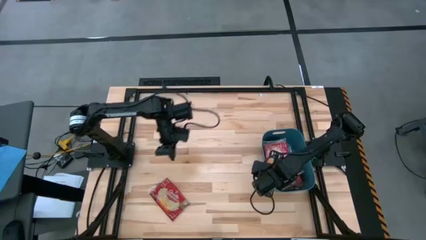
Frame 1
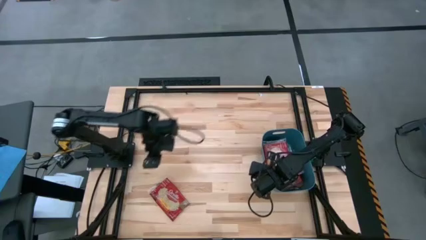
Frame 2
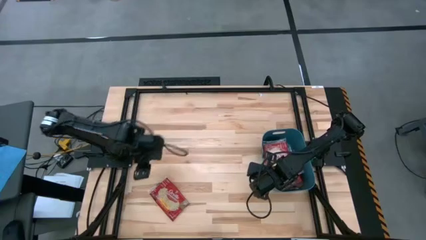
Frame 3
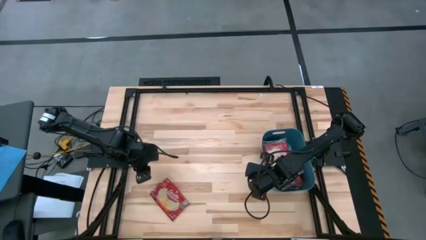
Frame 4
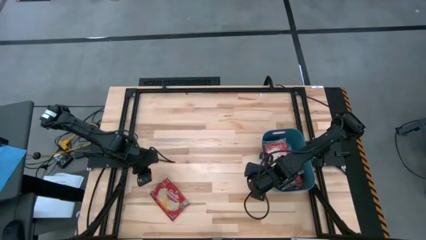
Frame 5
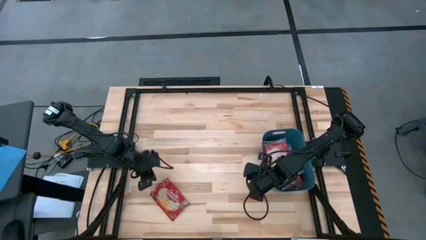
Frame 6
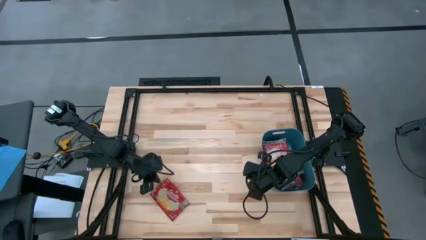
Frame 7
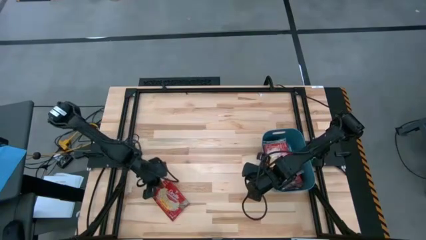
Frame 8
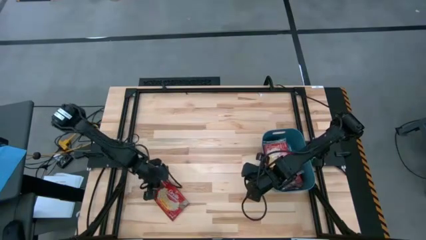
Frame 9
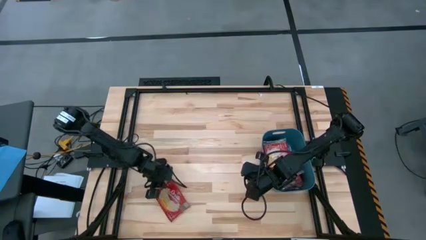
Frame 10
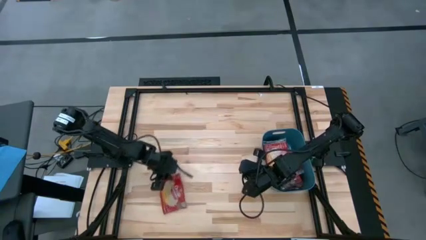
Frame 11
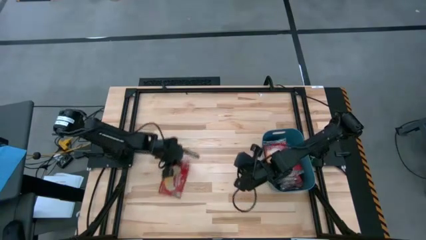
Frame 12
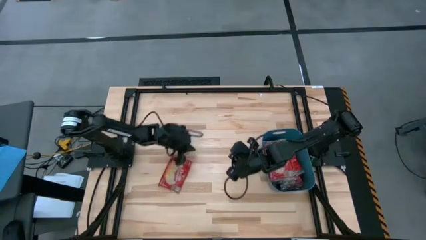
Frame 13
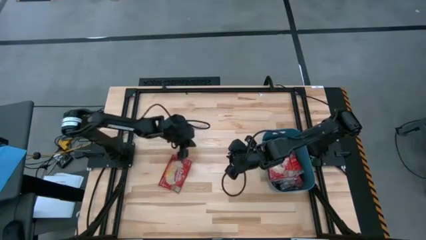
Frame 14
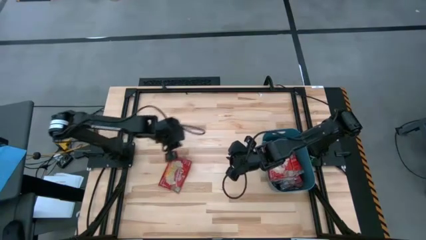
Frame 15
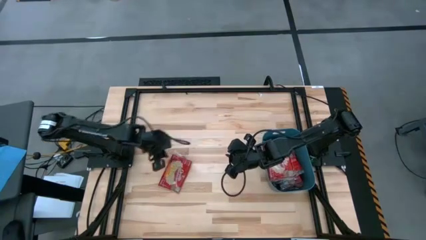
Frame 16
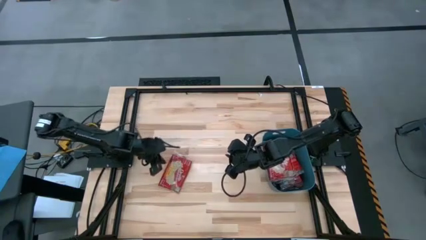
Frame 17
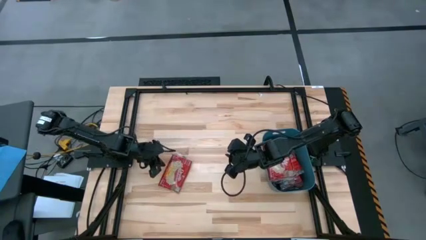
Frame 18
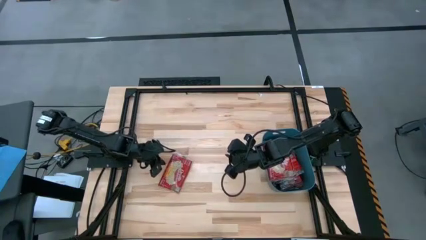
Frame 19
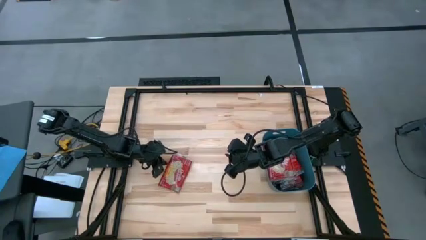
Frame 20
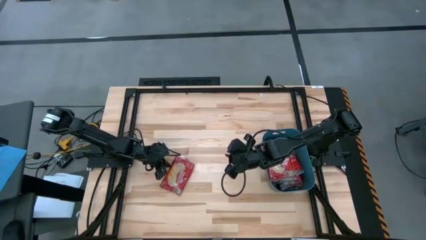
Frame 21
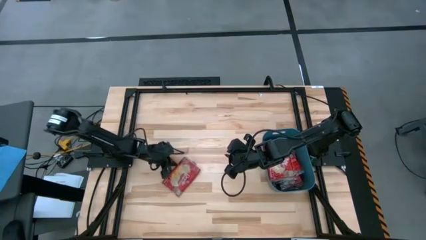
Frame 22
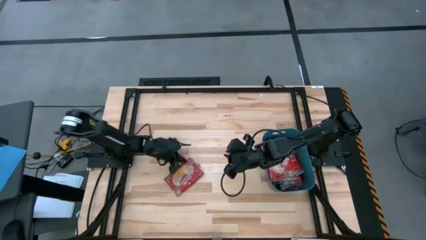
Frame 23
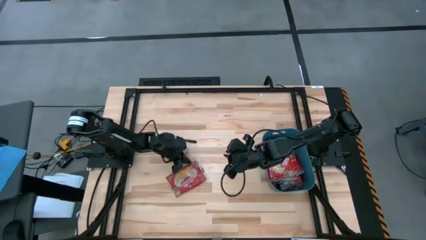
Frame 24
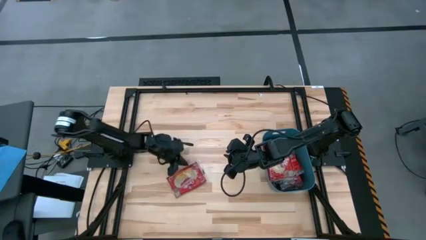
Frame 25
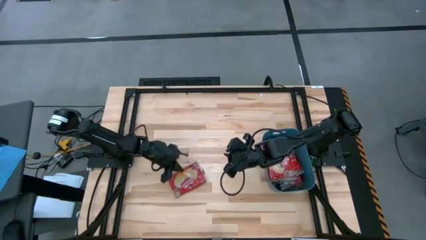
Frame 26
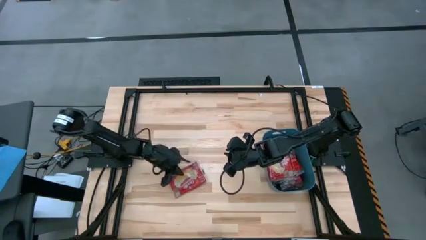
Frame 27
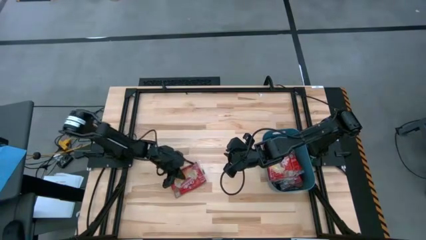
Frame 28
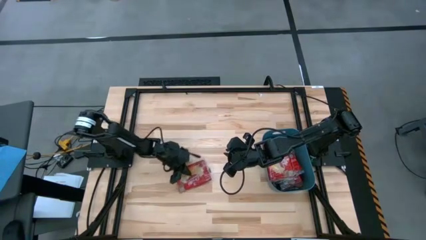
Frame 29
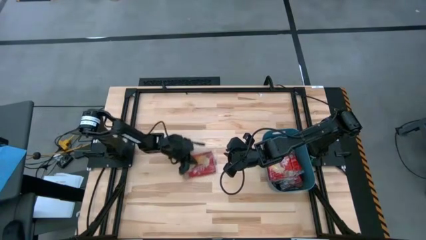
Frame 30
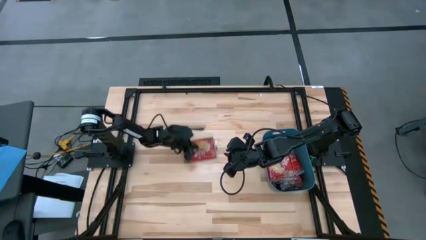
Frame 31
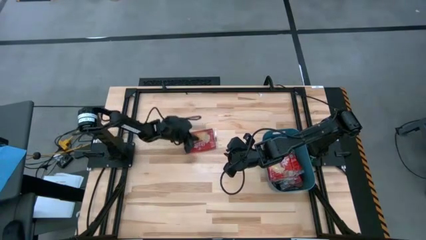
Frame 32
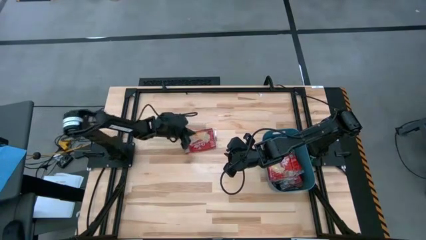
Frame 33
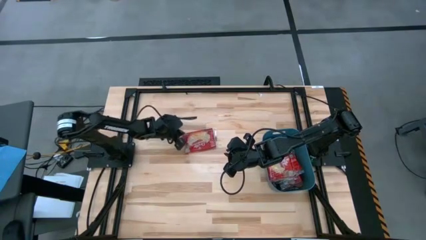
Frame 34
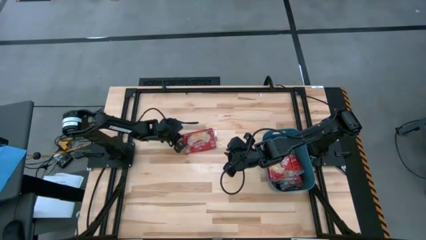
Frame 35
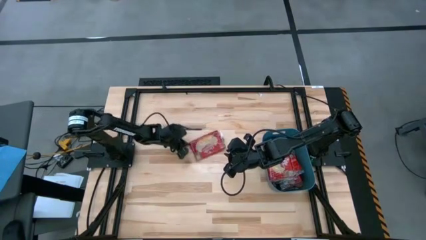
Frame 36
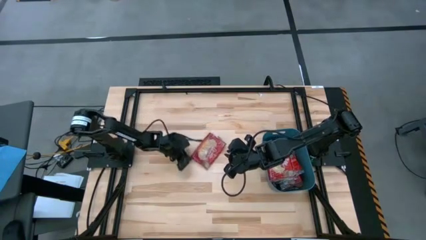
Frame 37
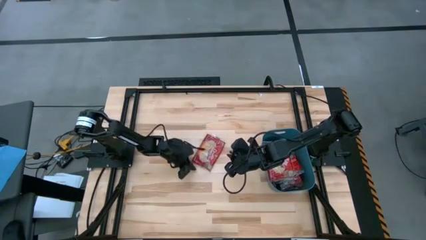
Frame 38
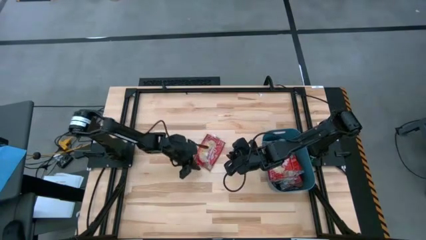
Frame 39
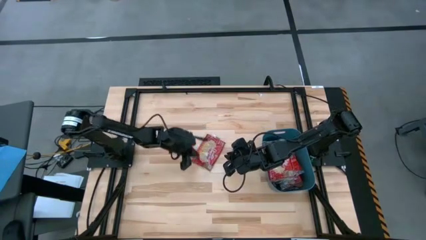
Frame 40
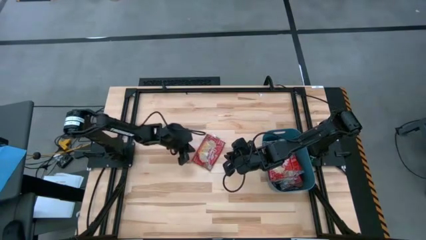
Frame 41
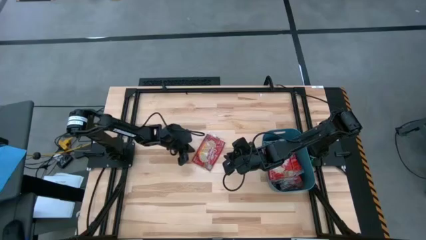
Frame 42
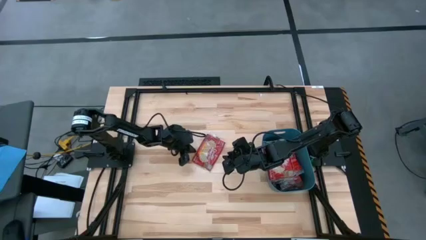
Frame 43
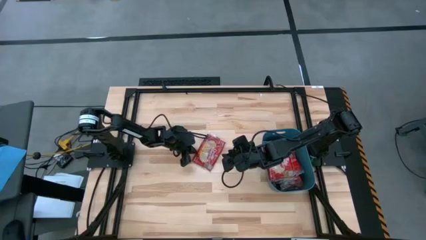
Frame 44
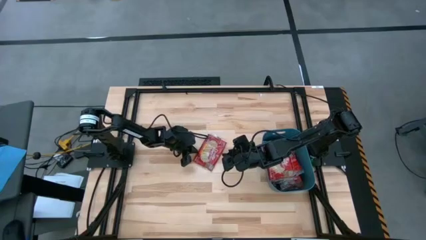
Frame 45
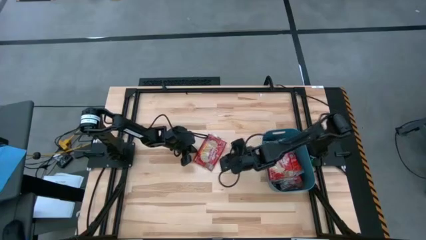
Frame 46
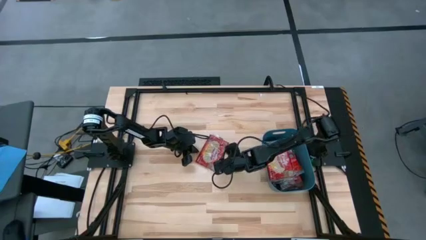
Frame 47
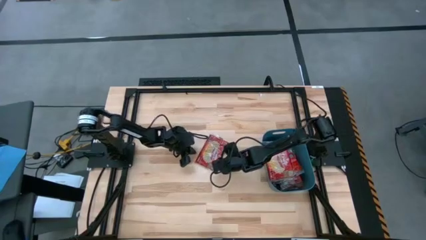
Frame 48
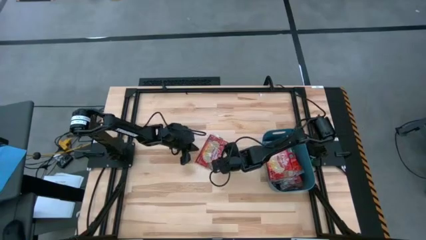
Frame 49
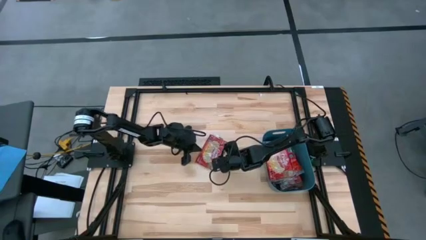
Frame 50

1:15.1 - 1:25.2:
Task: Sort popcorn bags into baskets
Move the popcorn bag into the center

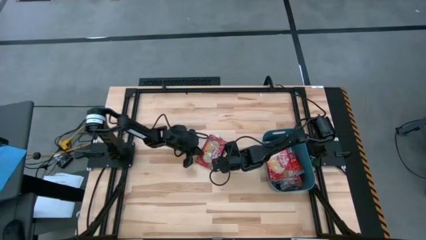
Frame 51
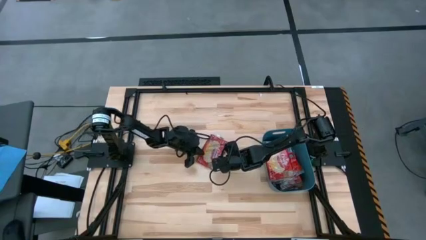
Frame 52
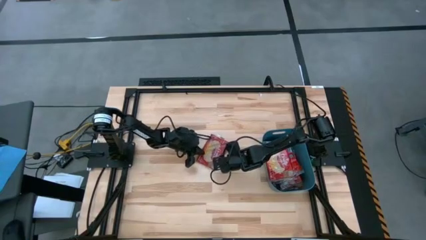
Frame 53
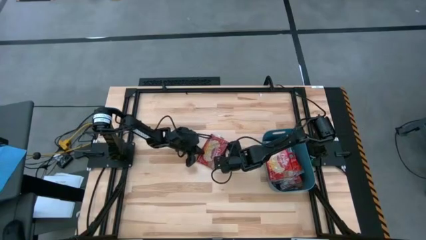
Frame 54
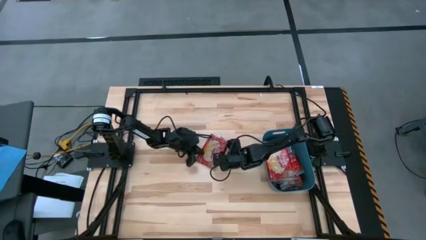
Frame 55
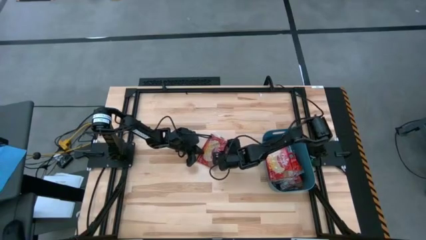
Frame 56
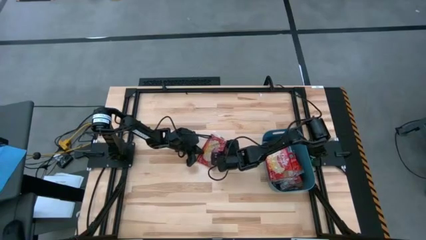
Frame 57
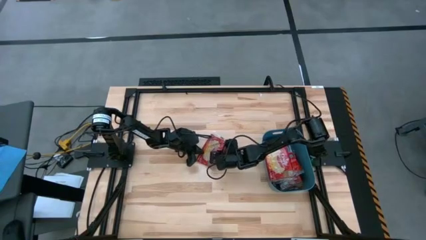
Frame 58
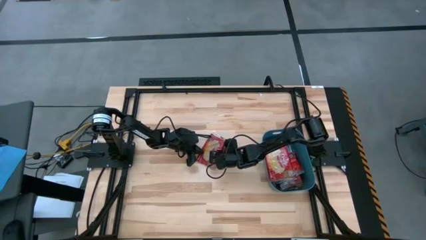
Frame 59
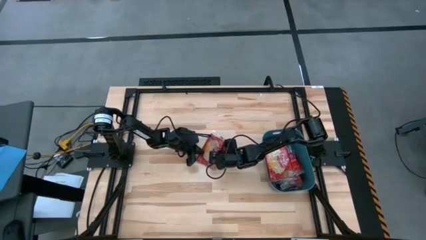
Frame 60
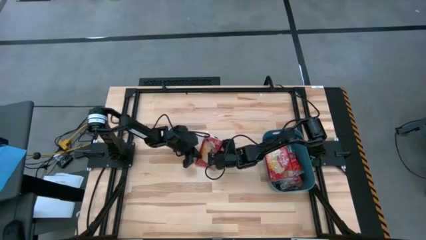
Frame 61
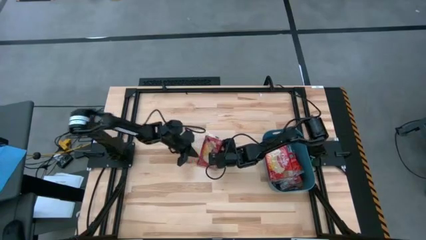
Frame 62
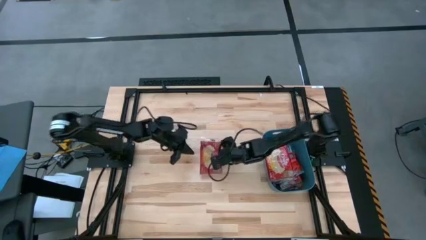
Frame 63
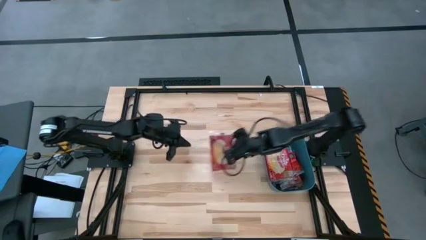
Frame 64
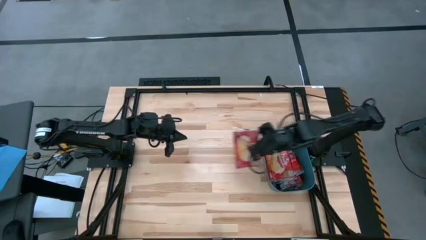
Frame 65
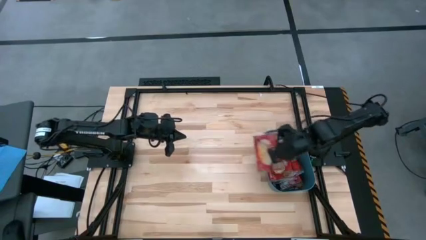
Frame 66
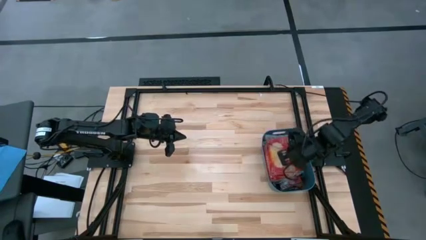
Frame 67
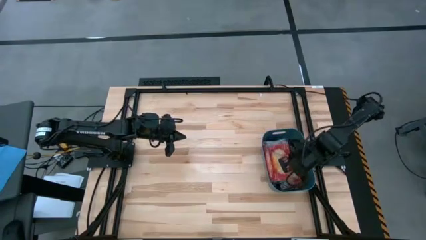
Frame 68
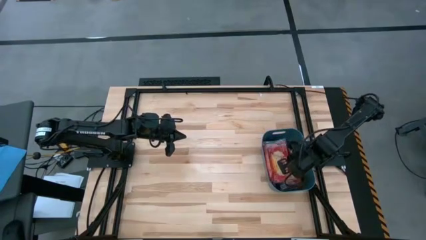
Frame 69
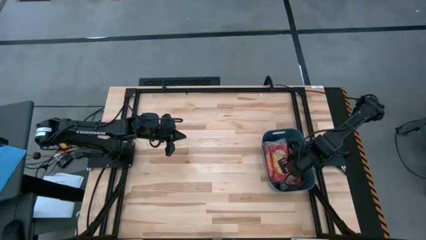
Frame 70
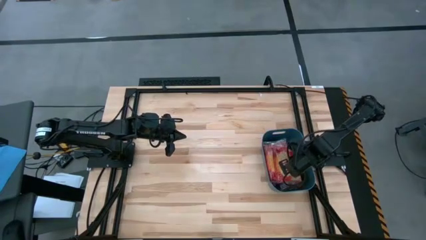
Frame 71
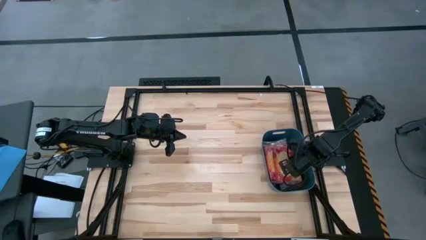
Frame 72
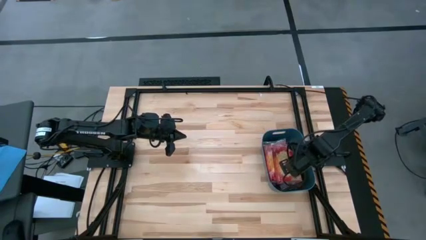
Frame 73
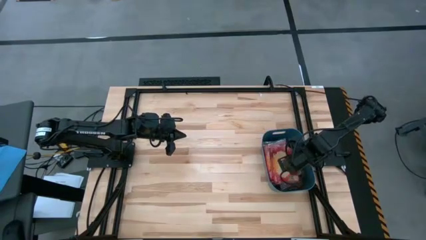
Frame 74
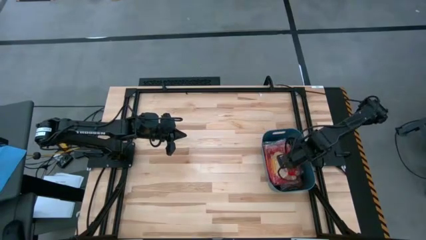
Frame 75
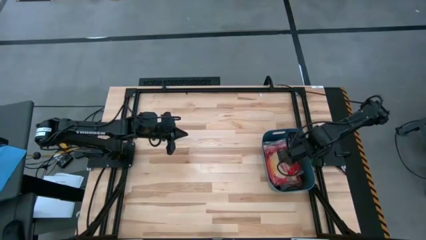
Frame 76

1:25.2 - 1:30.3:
Stack the popcorn bag into the blue bin

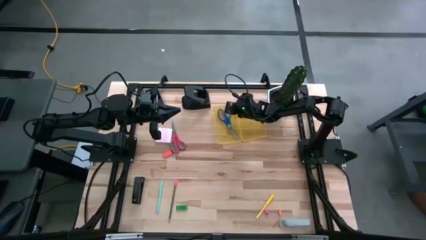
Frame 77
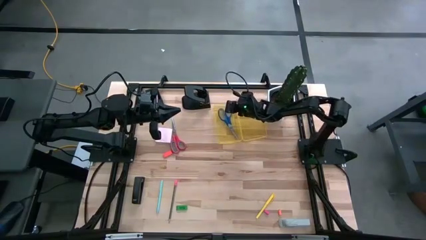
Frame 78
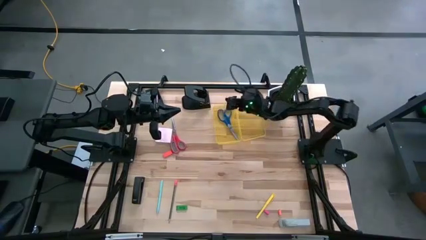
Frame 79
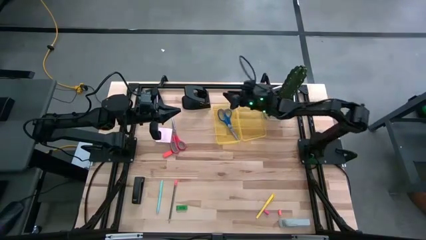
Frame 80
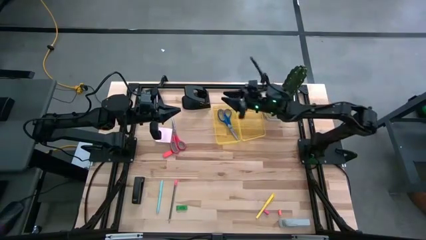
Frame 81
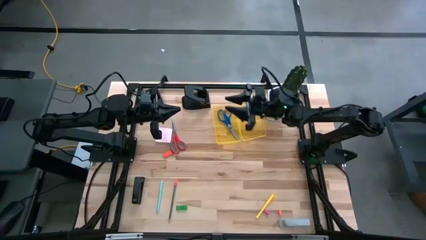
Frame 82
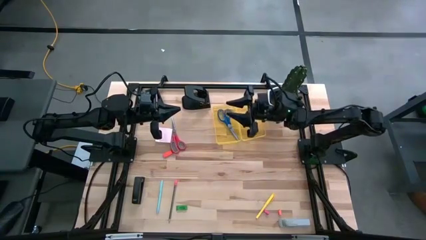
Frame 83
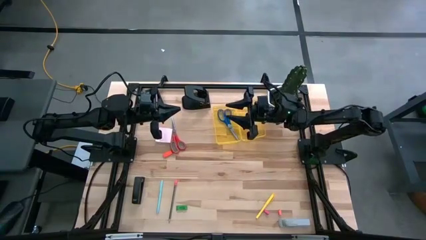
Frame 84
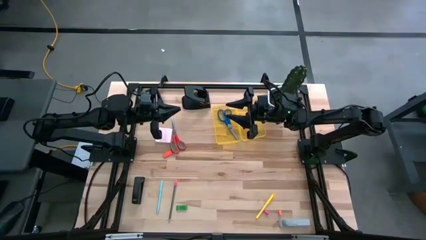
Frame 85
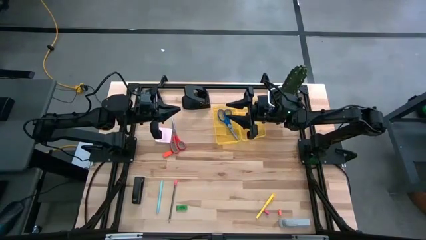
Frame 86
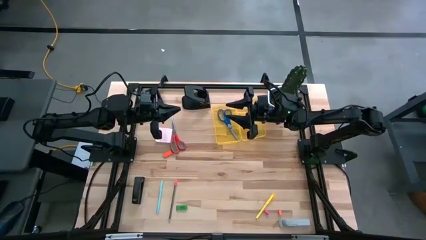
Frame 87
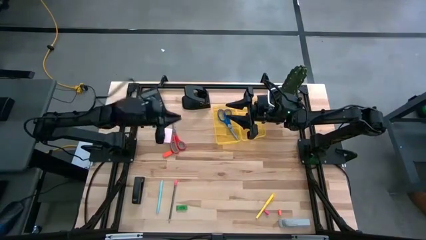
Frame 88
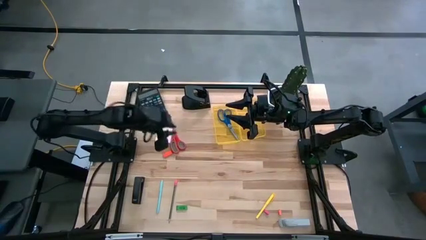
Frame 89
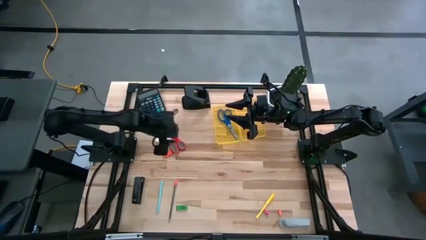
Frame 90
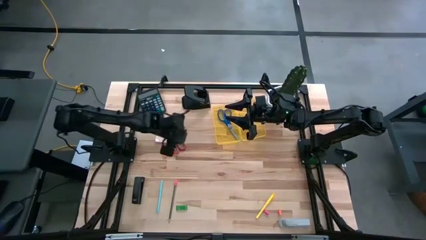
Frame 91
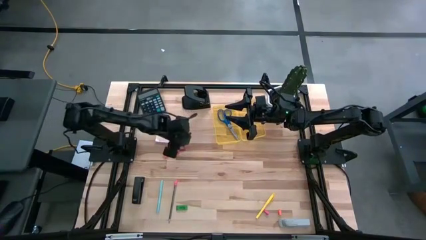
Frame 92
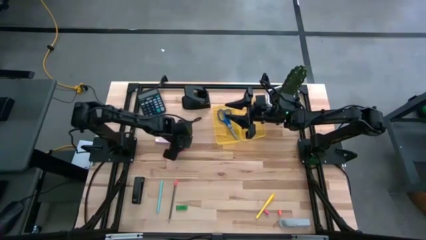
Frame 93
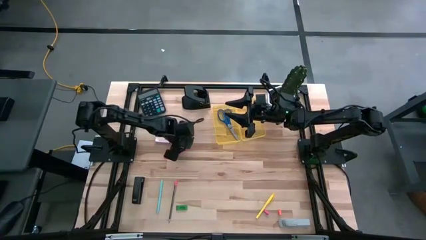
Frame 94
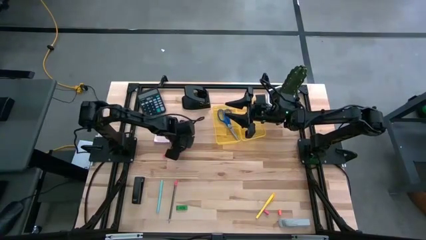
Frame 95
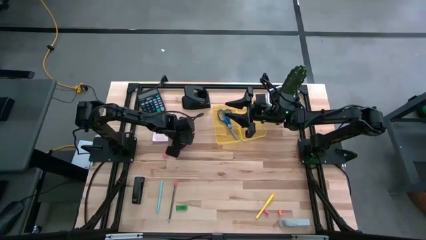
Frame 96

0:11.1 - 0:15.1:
Task: Pack school essentials
Put the red scissors into the yellow supply box
